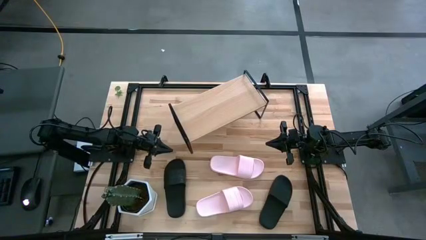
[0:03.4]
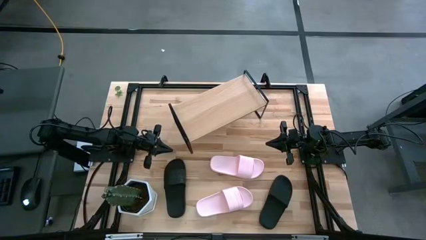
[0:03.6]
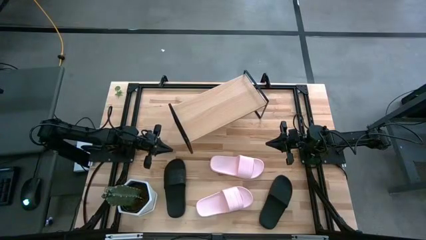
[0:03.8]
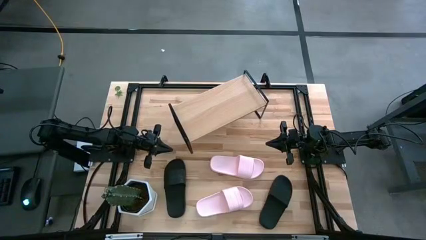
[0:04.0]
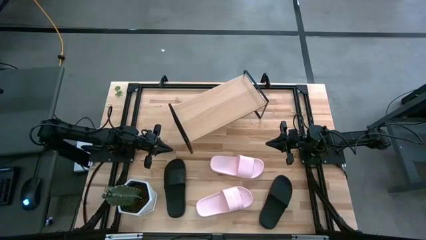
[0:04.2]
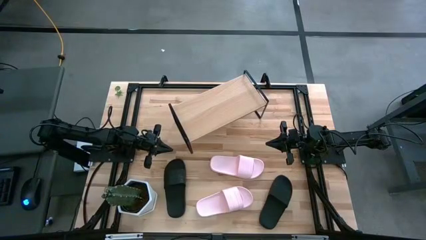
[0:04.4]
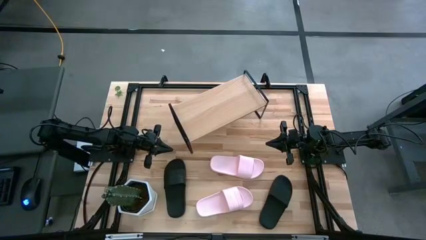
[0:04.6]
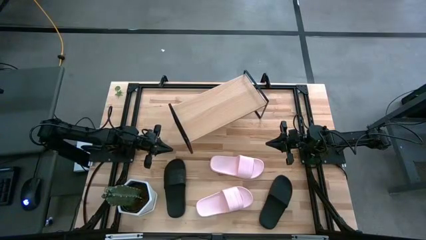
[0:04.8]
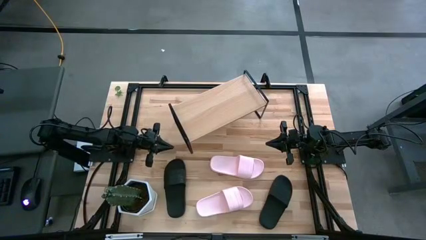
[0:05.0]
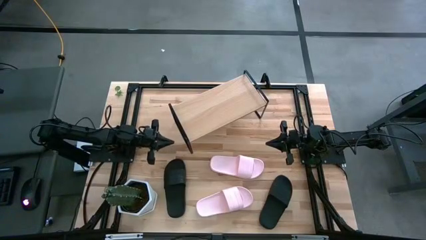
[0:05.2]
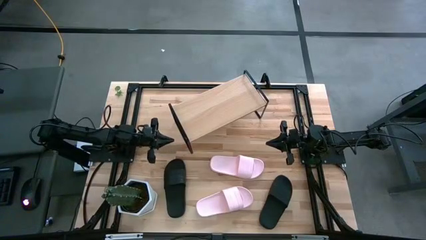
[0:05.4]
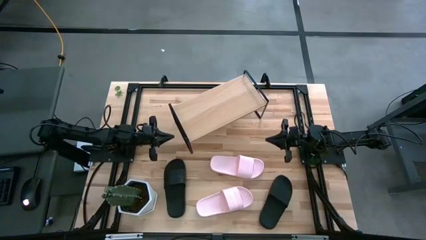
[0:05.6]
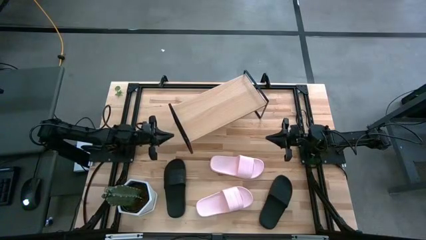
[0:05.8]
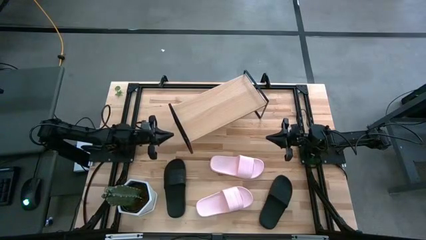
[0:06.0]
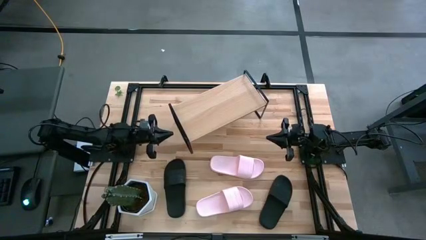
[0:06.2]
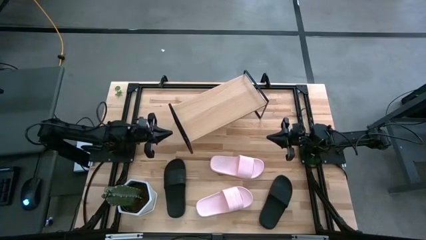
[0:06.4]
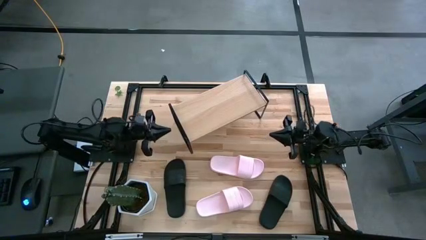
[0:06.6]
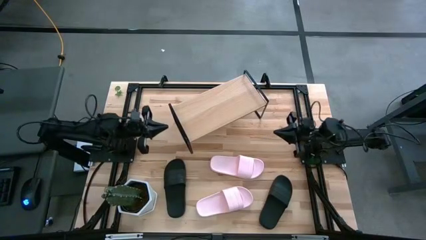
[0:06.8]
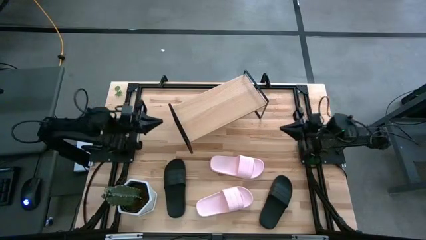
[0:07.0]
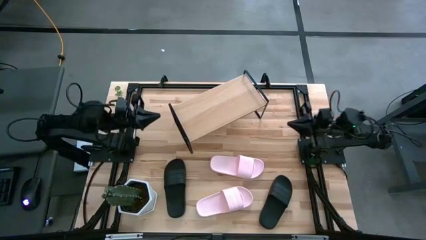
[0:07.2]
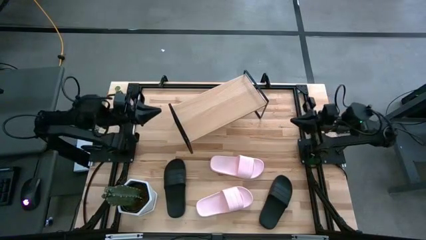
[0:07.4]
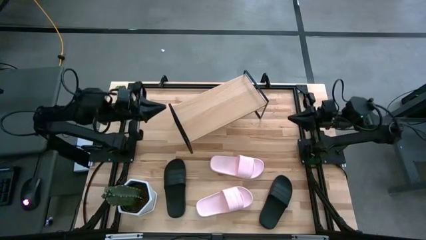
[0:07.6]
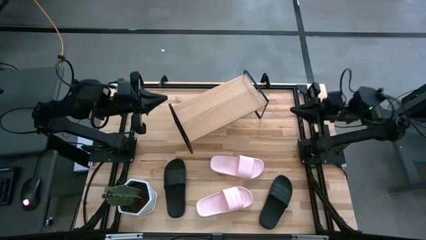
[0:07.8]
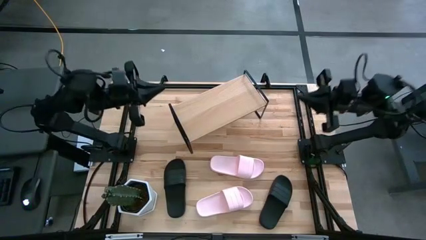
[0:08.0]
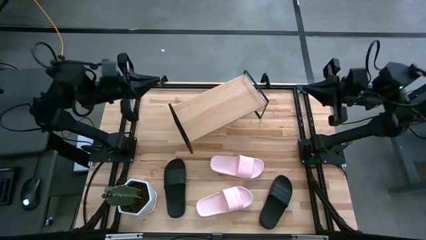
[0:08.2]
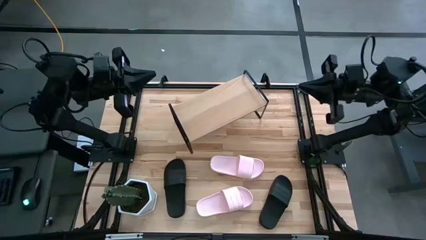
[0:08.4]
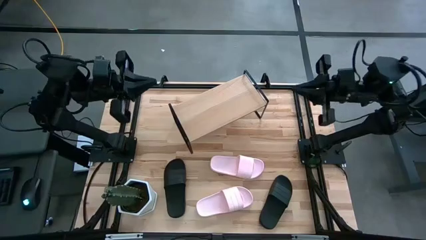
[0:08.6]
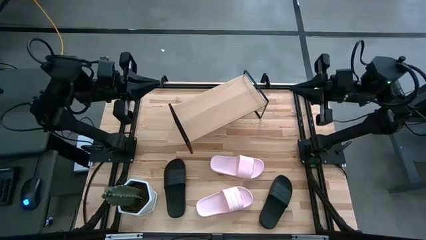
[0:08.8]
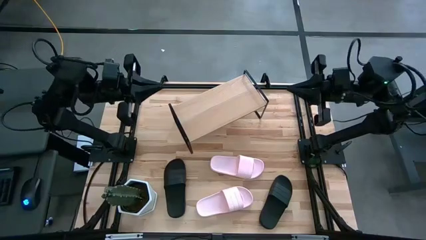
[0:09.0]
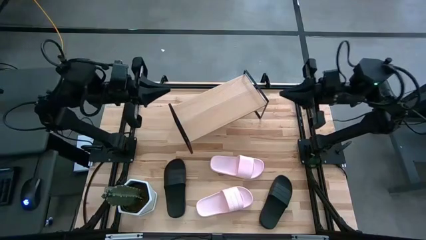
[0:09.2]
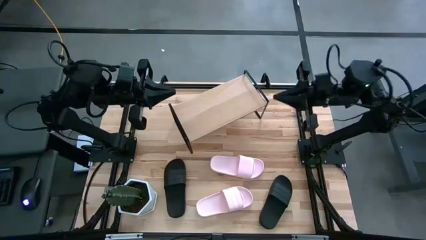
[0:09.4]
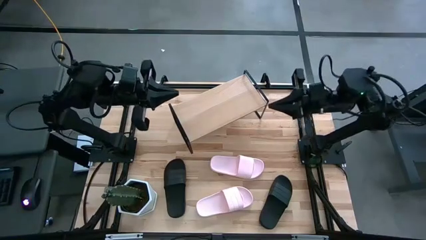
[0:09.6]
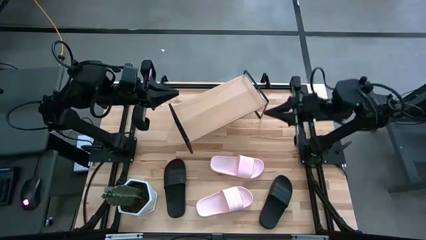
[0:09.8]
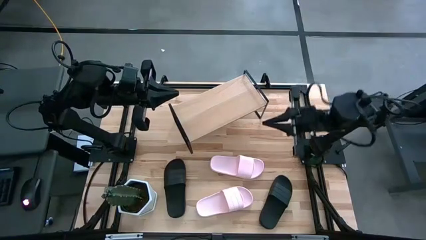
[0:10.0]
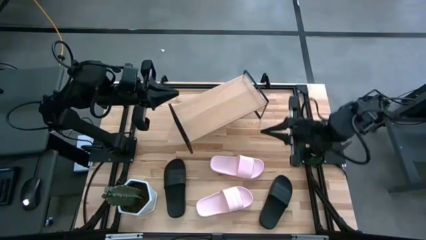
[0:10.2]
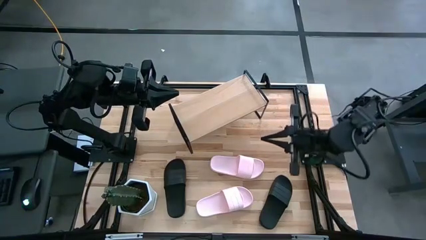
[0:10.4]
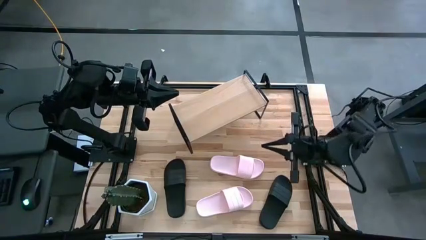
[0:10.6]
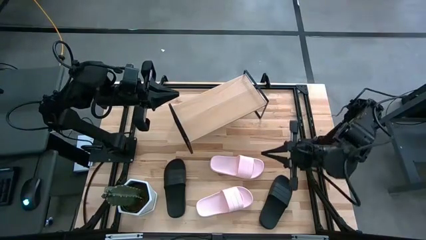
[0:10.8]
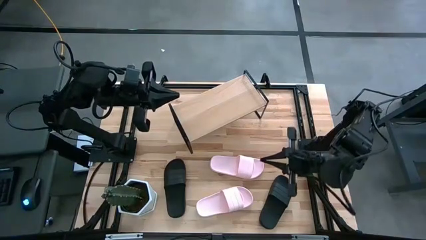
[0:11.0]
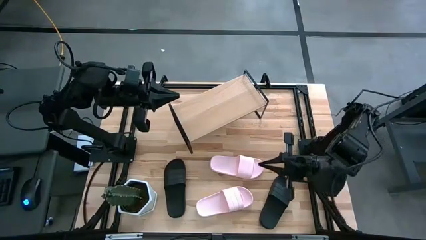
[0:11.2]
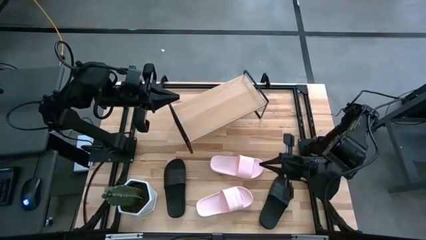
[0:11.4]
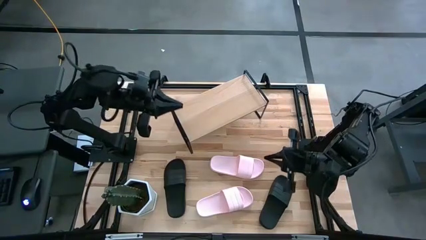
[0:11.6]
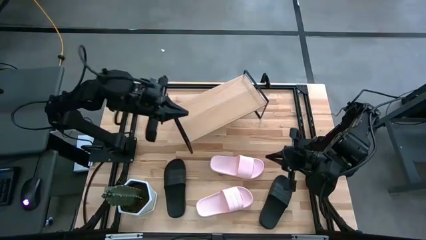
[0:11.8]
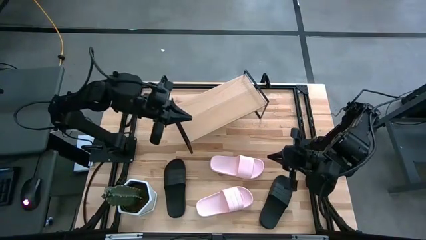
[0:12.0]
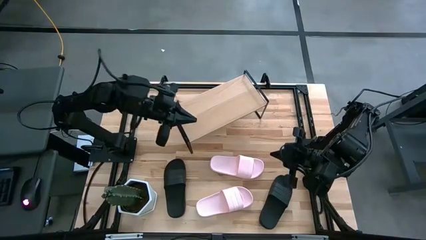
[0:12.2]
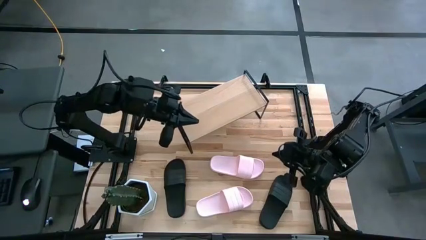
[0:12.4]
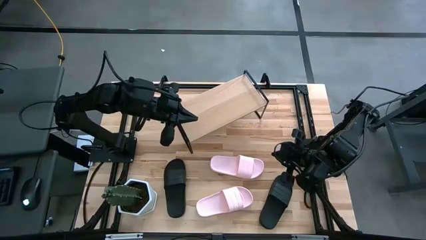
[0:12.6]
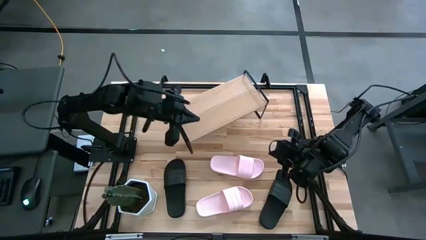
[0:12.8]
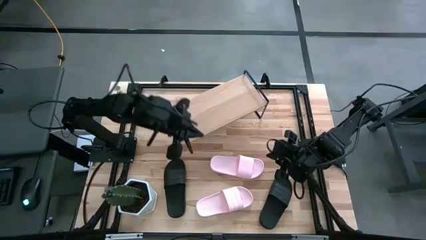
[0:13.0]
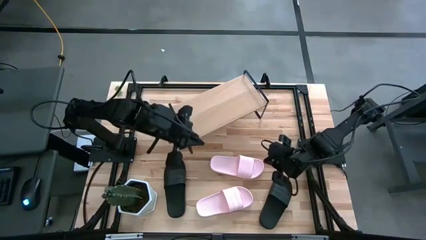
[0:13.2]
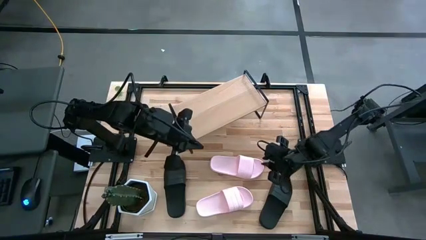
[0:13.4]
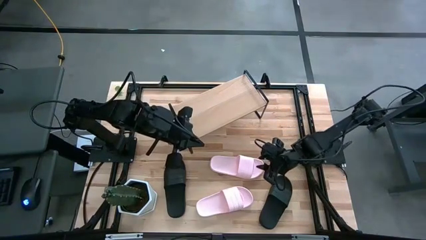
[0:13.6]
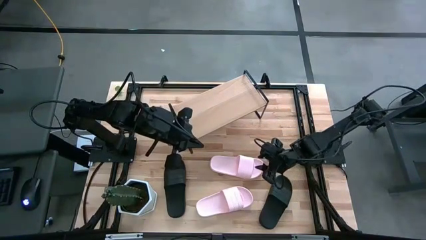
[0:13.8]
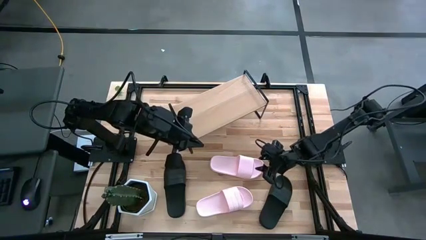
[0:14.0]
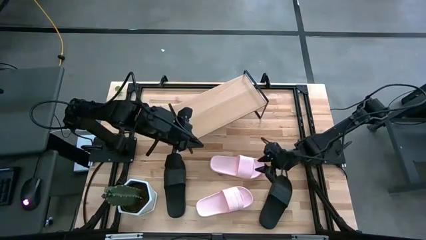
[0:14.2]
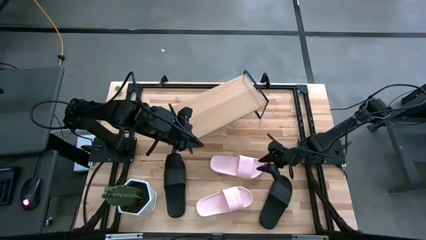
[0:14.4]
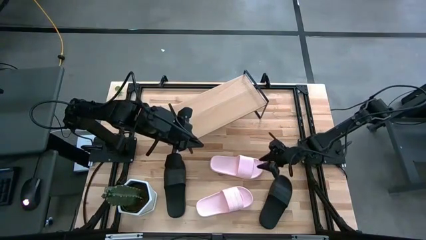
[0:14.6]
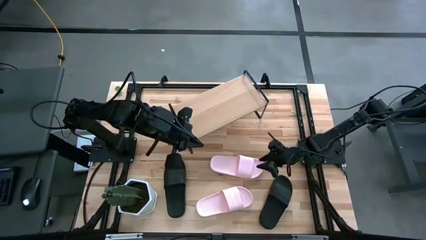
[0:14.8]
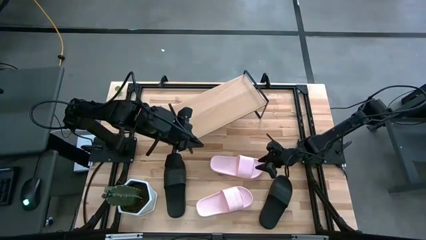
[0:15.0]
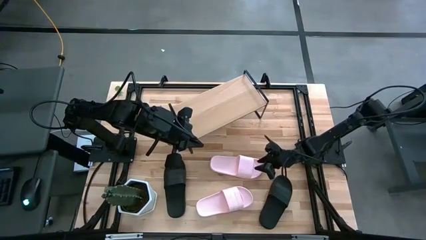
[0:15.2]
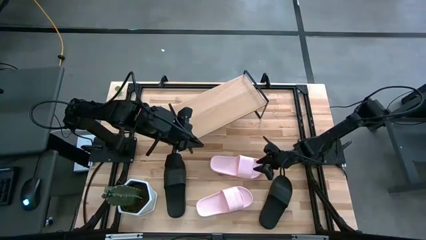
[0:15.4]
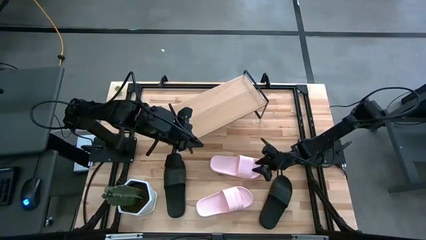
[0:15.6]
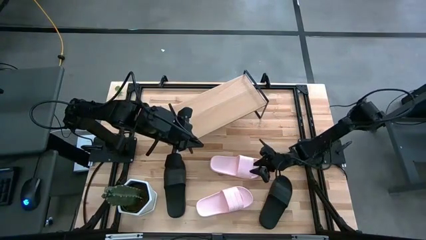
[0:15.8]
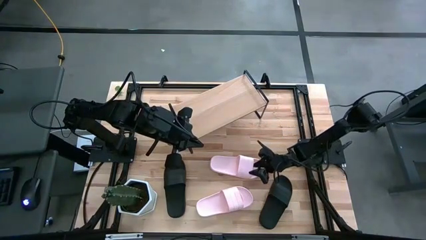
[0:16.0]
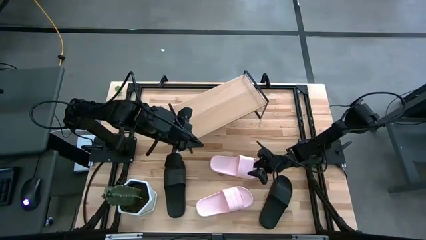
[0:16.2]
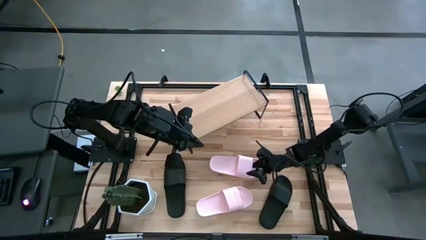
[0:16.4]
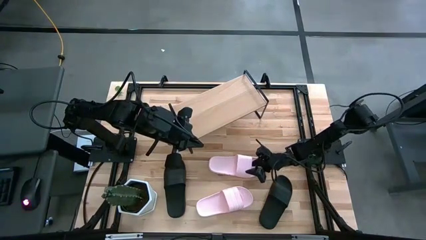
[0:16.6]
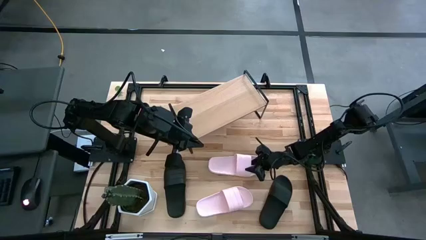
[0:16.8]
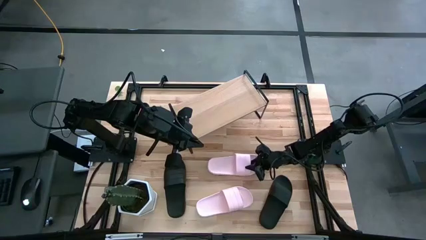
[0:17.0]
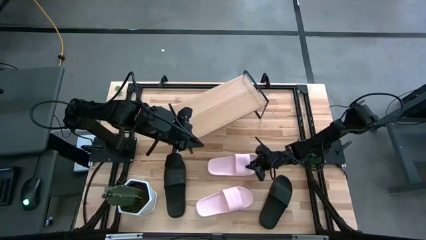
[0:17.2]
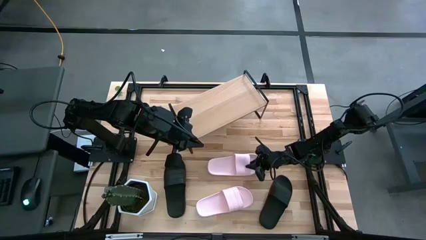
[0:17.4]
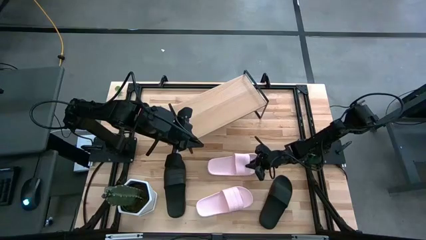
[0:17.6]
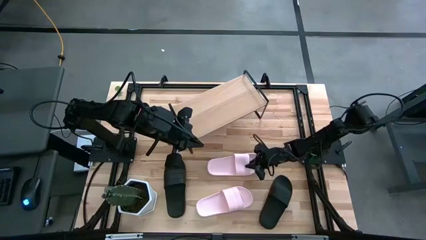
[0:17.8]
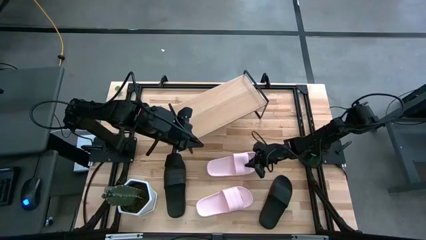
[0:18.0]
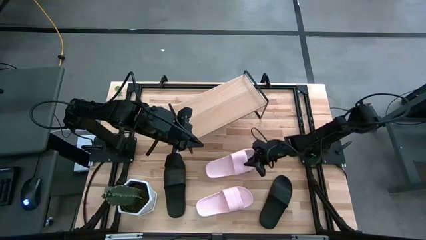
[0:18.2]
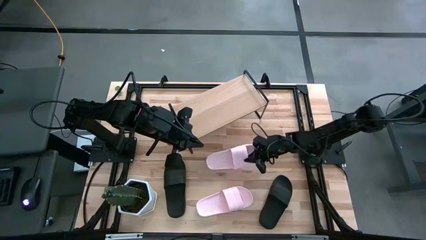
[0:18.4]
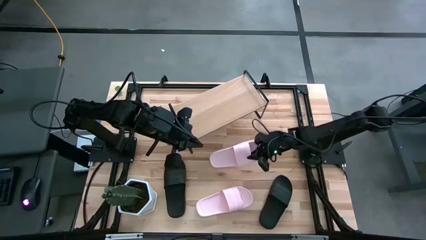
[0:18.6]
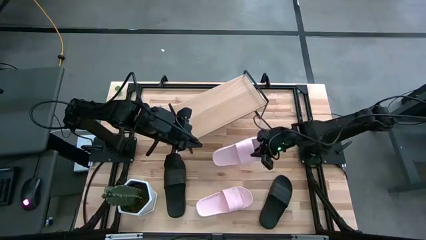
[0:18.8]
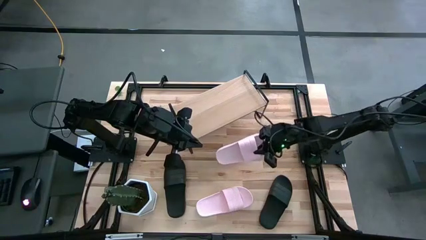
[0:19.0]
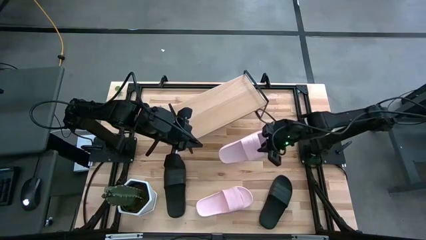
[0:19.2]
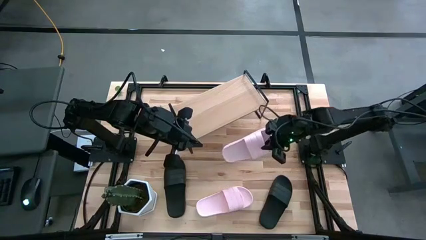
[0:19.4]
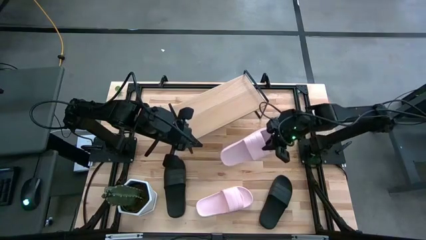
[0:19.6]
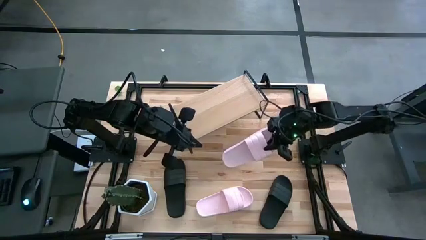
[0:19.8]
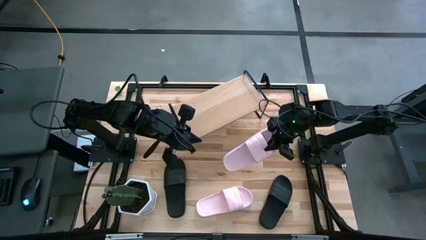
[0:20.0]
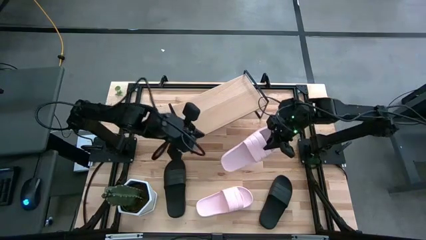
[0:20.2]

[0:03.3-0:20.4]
Task: Pick and place slides into the shelf
Put the top pink slipper on the shelf
